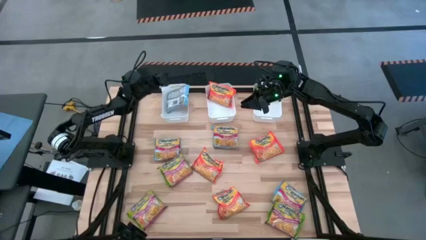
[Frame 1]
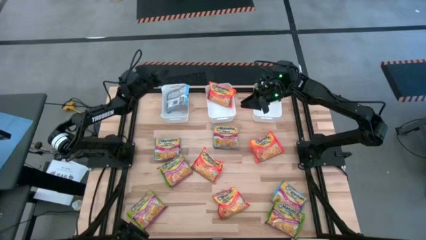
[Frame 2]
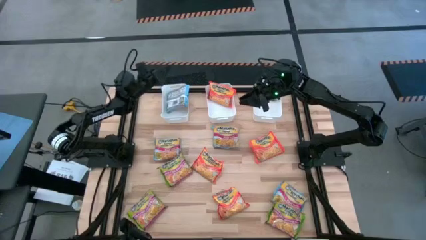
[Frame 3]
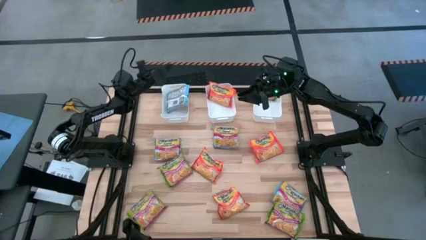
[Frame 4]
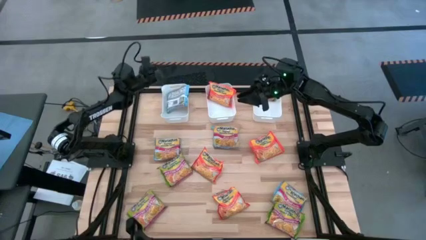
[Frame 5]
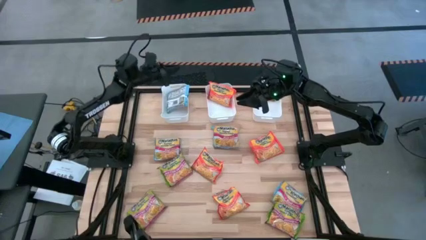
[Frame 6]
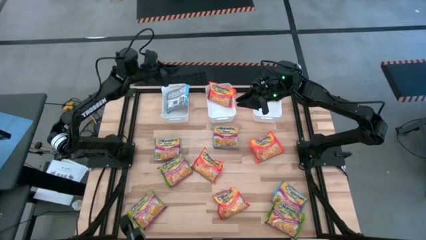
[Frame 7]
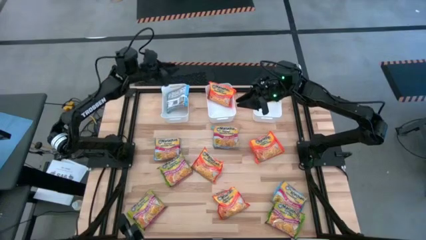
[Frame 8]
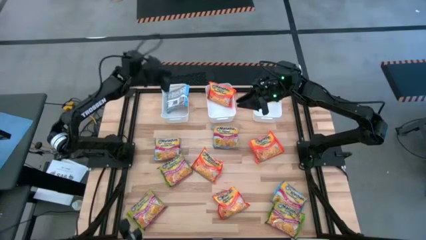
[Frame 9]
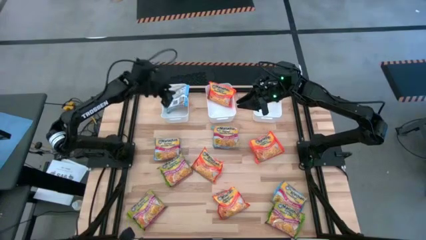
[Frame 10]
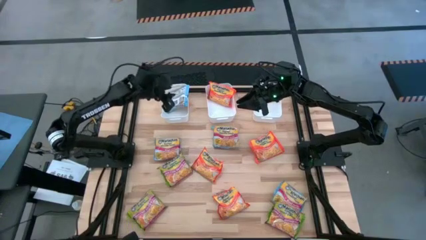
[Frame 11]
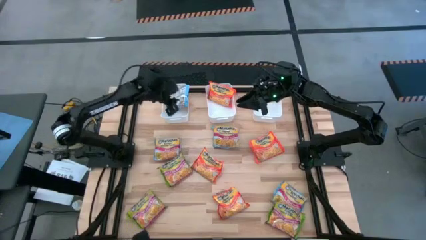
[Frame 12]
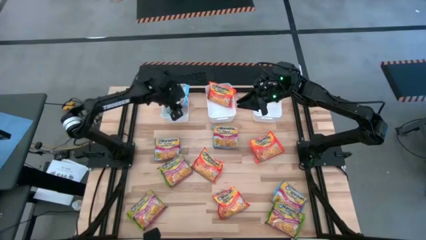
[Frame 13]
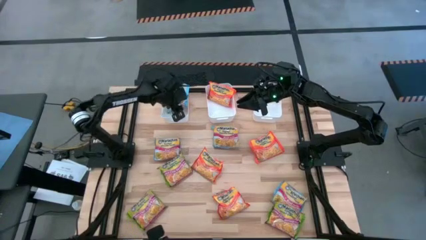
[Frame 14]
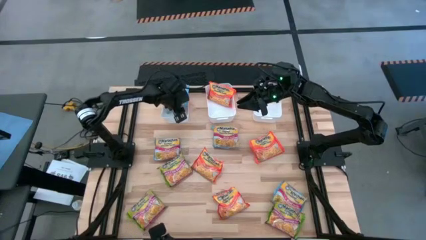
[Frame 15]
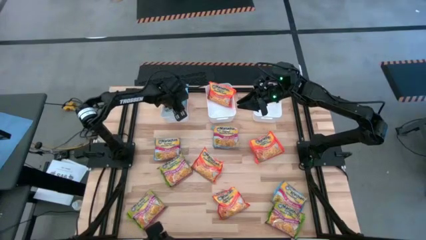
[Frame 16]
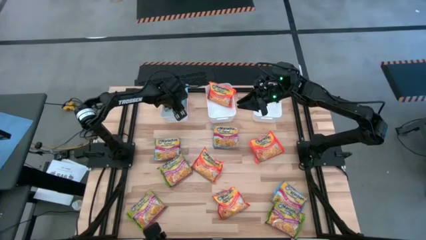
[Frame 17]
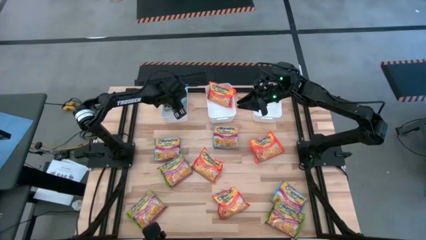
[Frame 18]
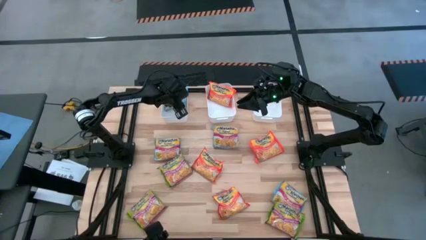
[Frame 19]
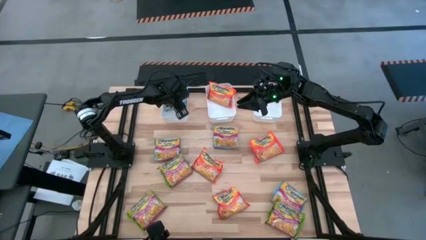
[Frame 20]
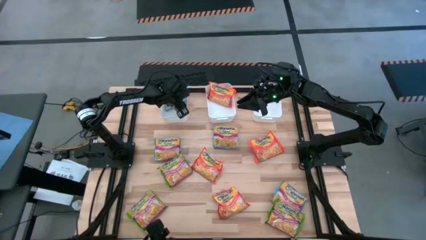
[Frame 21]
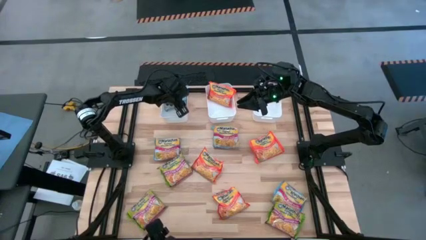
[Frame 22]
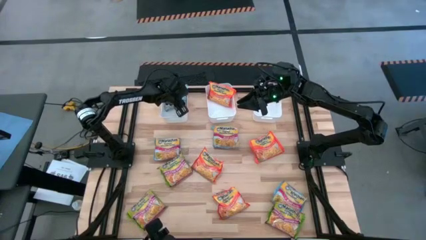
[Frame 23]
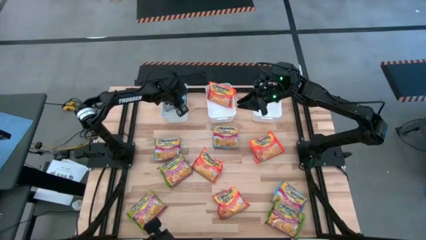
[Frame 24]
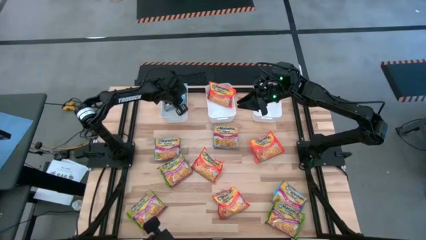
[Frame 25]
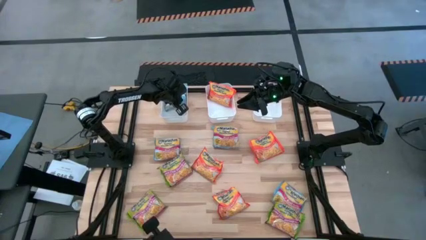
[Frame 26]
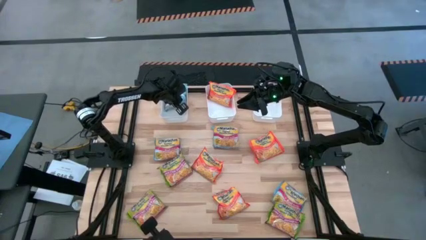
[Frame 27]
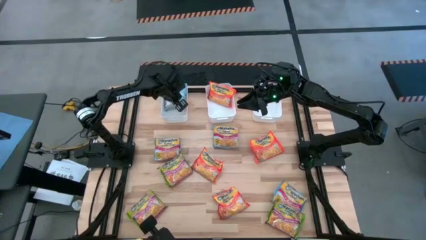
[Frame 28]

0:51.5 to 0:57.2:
Task: Sort Maruchan noodles
Adjust the blue noodle pack in the left white bin

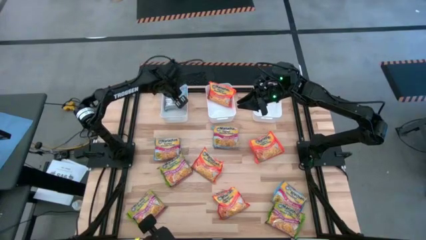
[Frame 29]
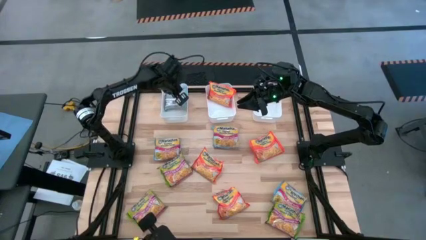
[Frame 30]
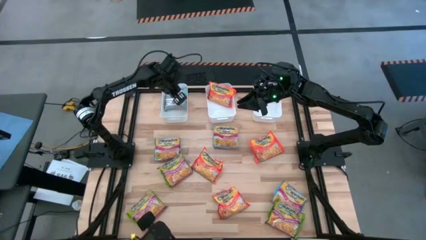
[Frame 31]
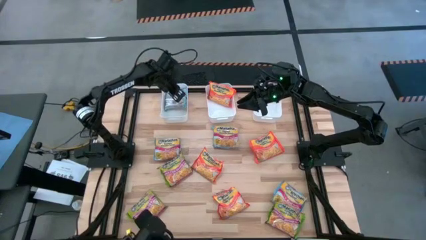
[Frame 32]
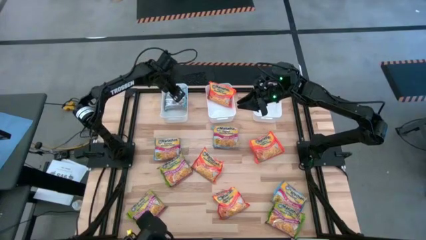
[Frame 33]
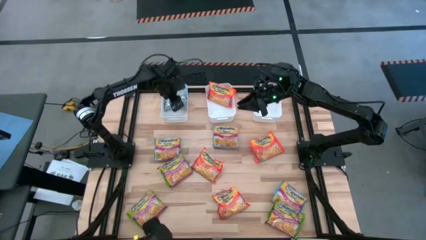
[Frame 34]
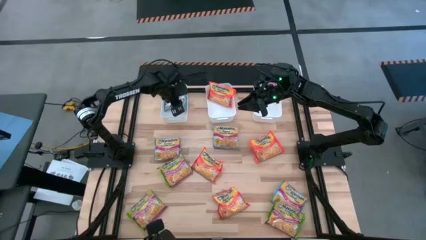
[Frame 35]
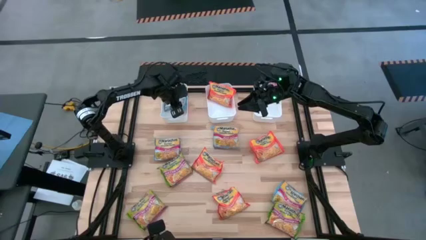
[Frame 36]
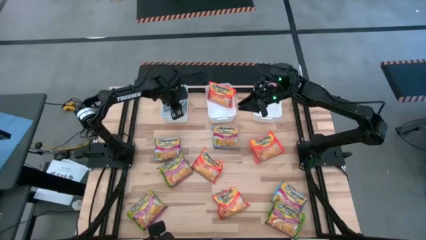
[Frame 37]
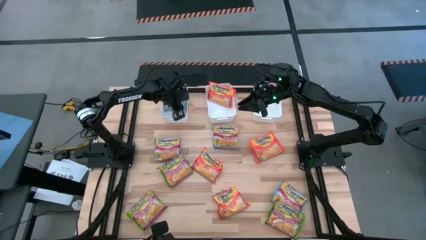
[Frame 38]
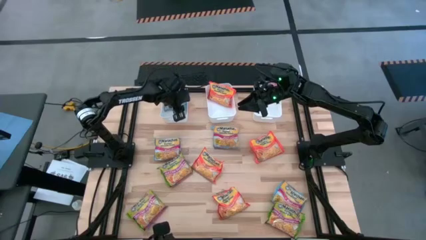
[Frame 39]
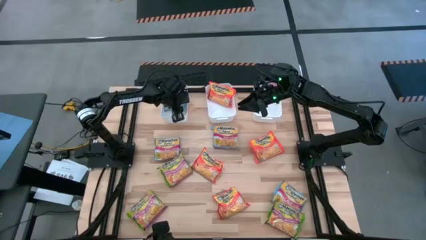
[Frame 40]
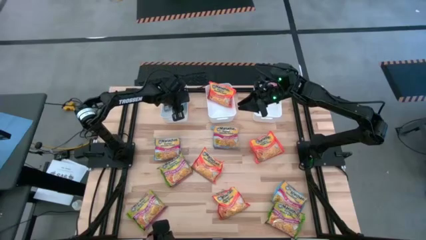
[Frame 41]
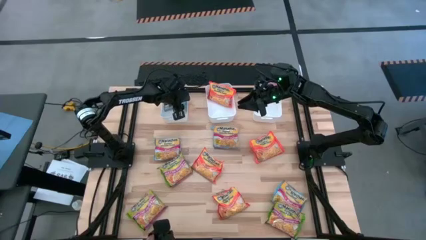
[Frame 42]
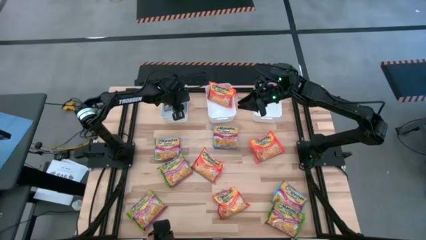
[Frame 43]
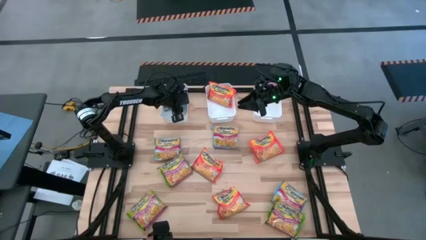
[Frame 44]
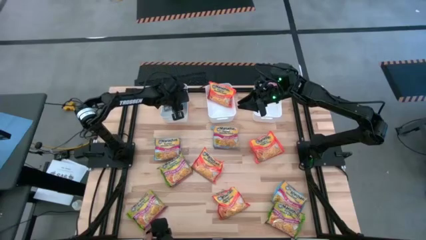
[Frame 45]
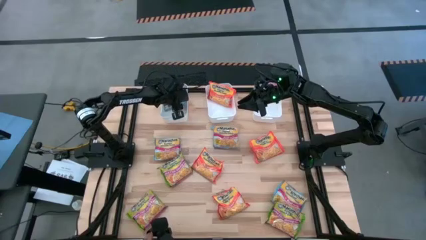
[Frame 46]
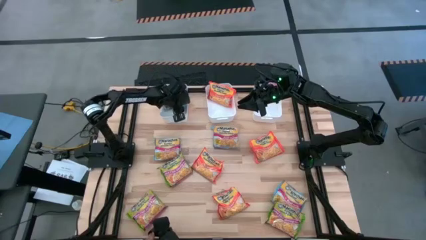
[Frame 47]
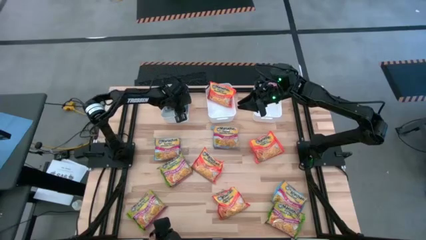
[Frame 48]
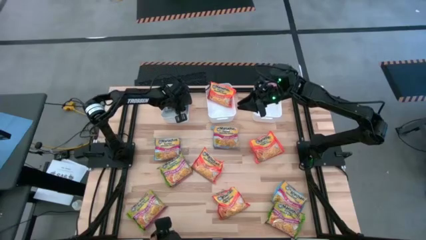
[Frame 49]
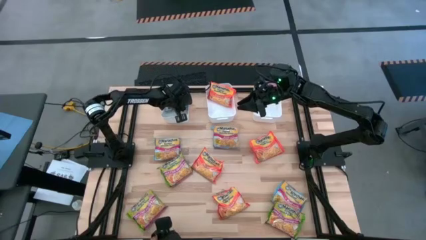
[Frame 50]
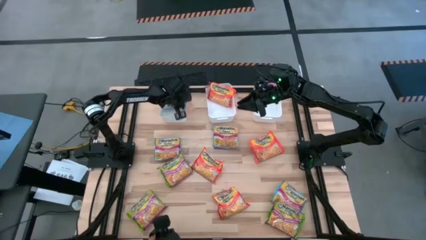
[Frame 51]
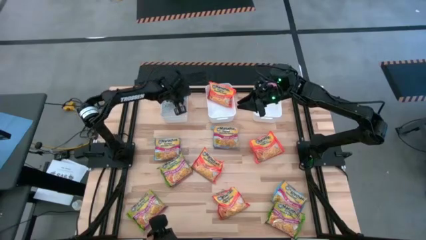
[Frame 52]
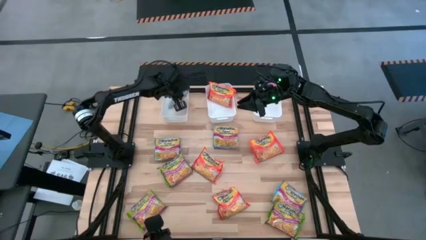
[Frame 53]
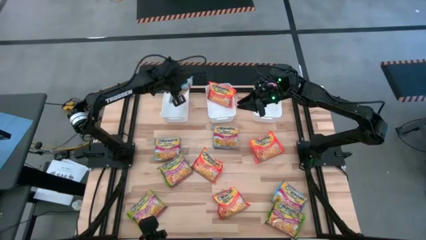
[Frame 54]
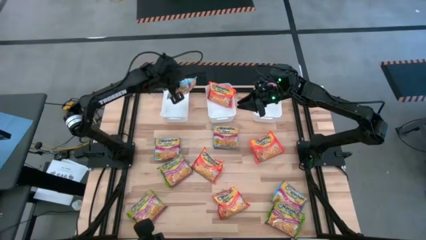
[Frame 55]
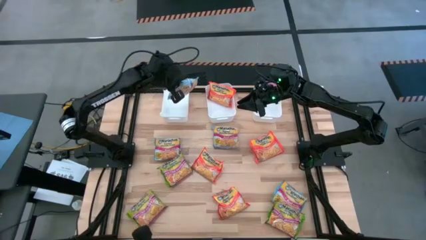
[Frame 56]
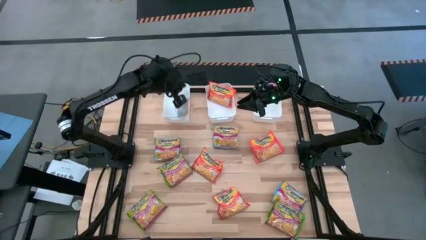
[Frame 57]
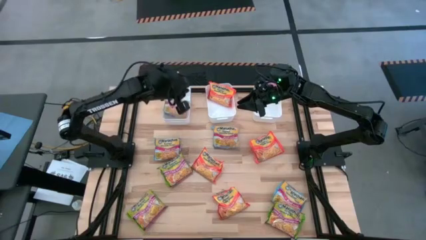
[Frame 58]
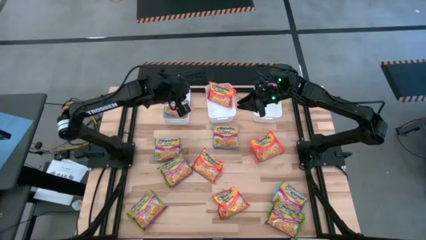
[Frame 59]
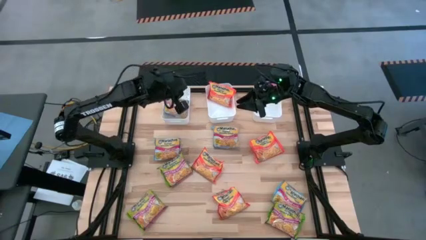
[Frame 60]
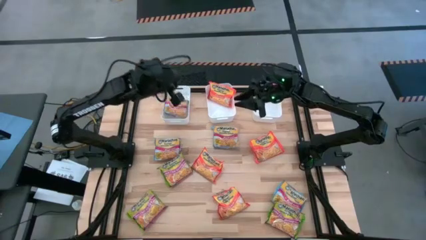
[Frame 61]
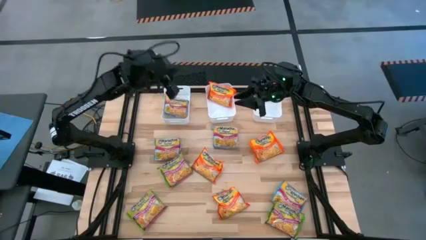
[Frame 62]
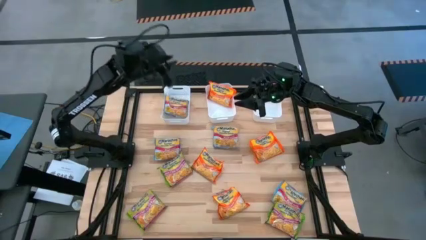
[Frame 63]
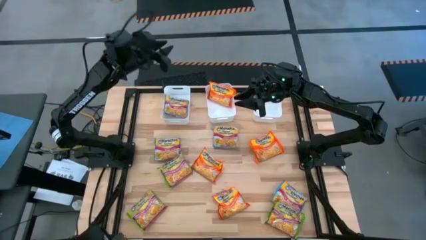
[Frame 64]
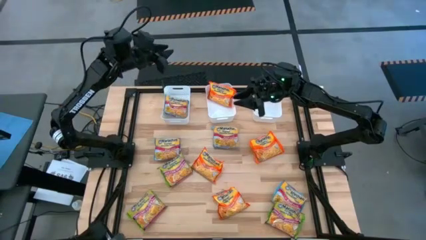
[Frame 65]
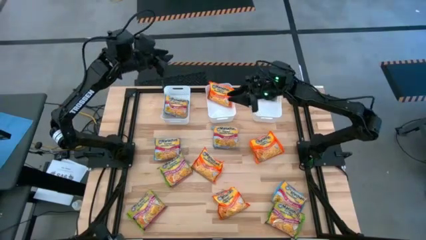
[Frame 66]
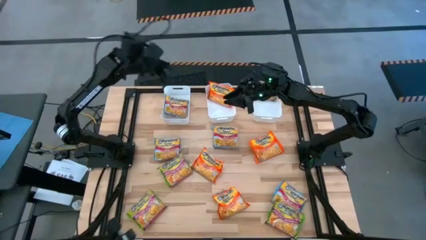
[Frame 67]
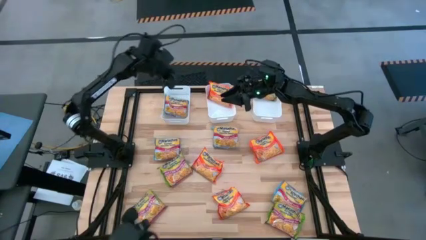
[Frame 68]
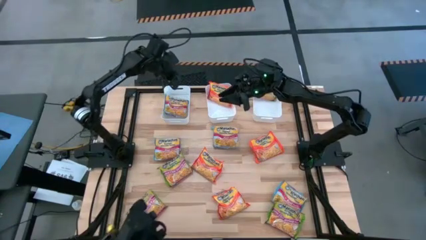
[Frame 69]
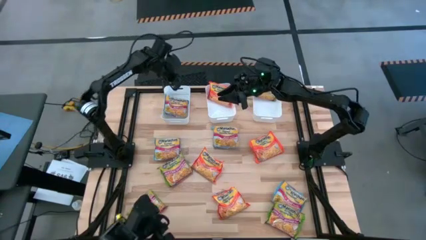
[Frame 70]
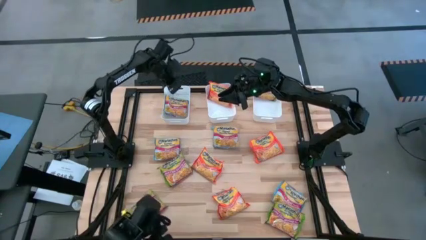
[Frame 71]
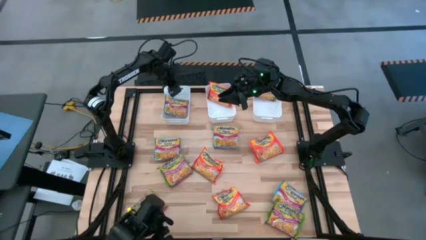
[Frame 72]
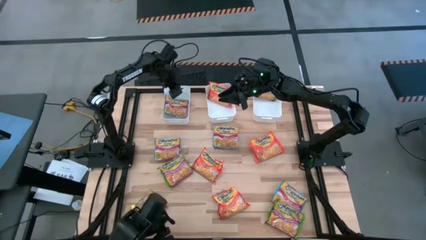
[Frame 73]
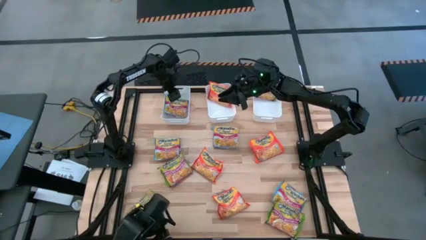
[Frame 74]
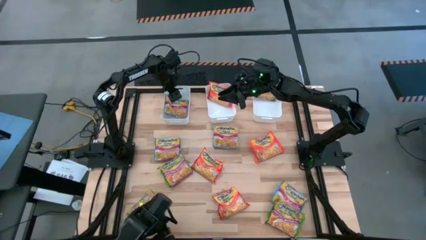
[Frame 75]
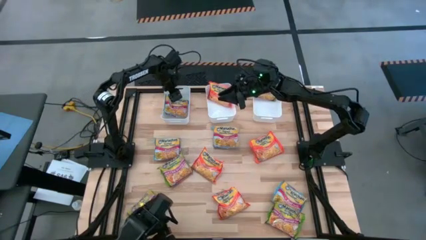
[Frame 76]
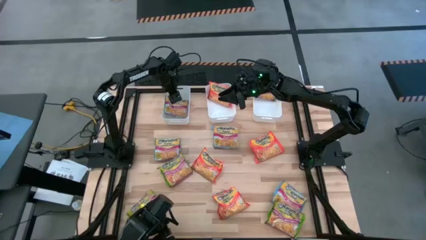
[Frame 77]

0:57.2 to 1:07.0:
Adjust the blue noodle pack in the left white bin

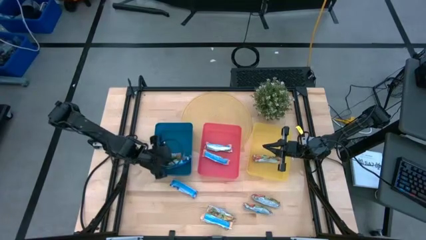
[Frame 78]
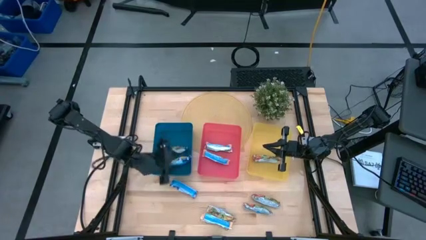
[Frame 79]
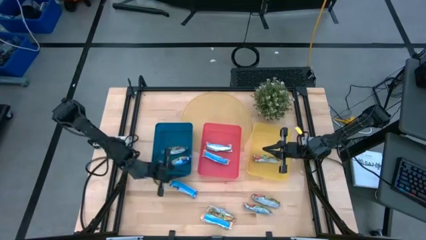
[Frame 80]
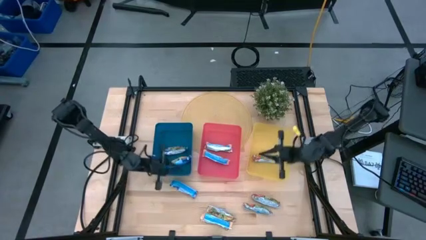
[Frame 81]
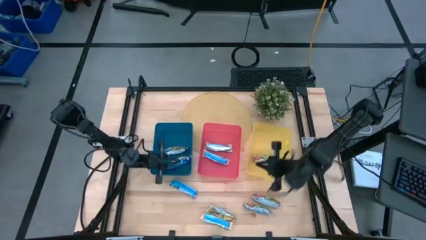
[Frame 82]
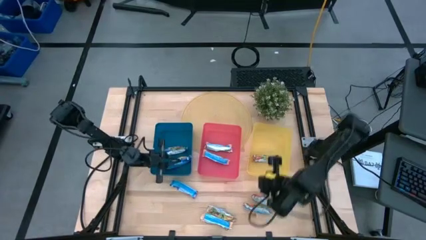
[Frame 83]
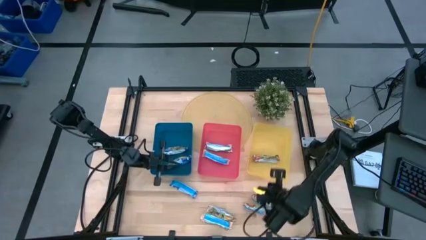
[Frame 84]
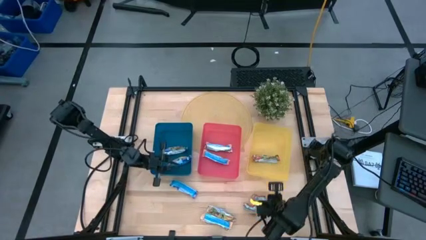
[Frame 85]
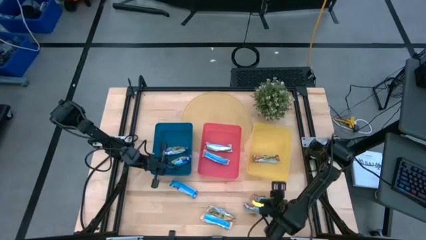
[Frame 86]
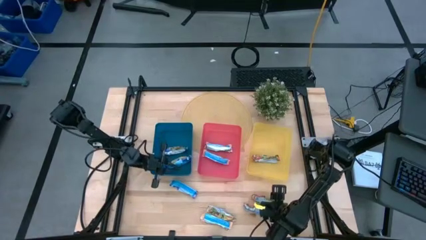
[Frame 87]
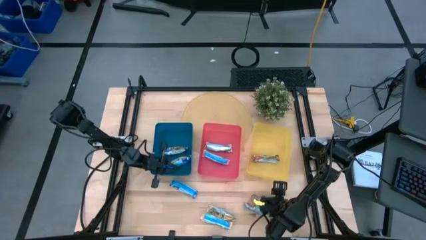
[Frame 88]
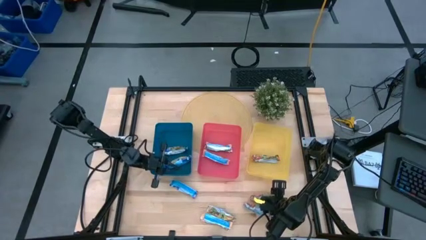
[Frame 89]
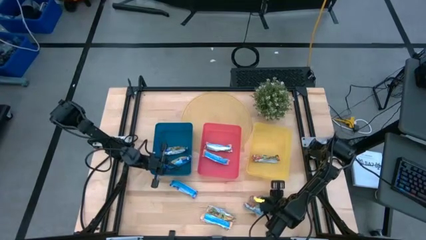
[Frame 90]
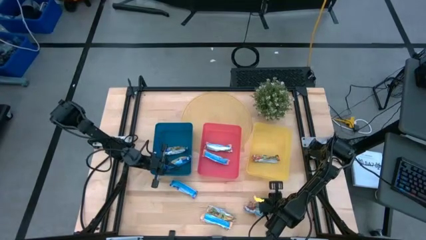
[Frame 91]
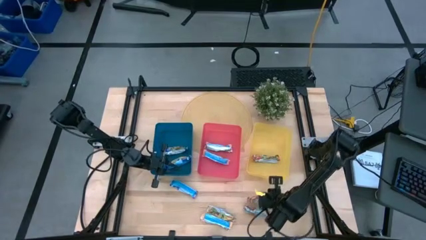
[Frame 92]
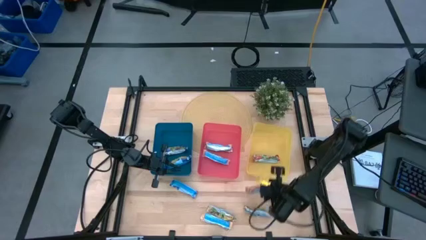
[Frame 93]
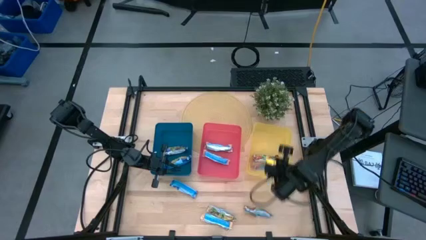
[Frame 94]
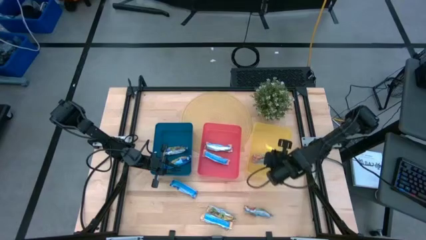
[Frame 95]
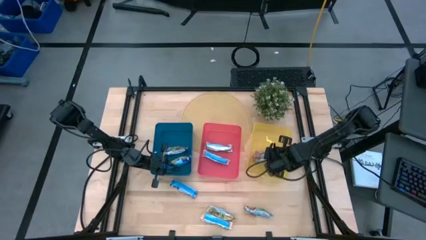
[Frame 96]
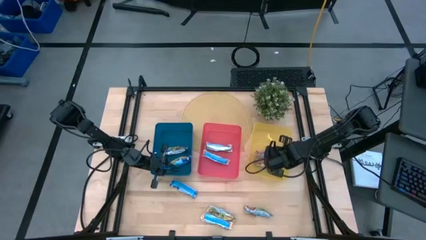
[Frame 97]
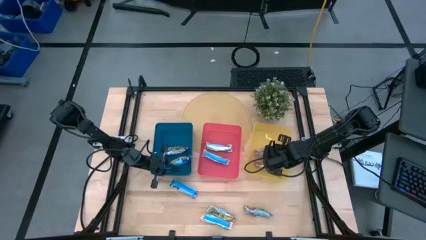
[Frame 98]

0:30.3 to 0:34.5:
Task: Pick and place Granola Bars by type
Put the red granola bar into the yellow bin
